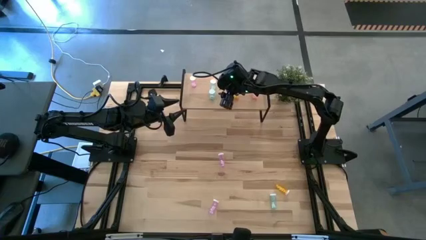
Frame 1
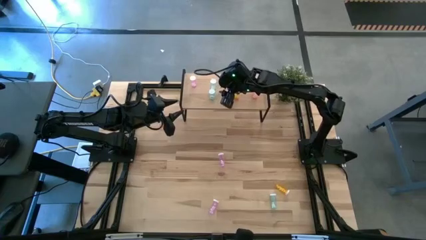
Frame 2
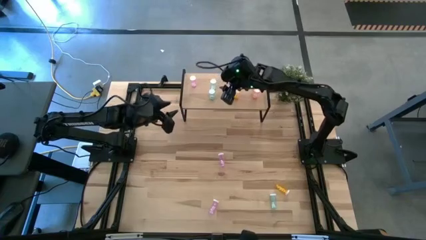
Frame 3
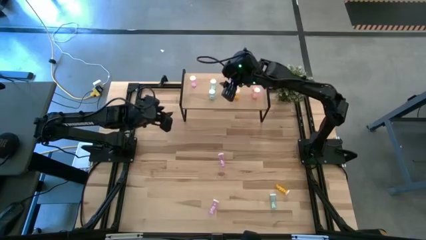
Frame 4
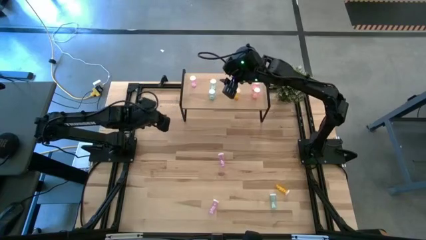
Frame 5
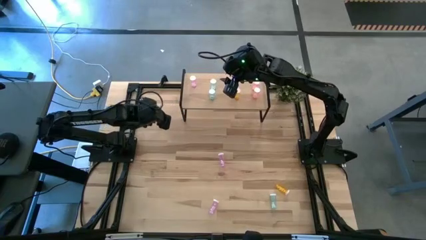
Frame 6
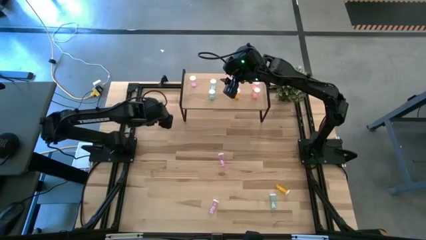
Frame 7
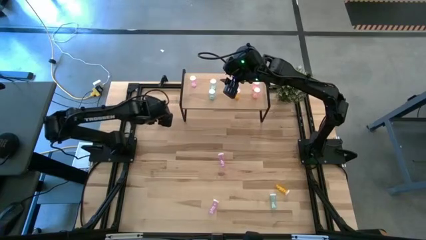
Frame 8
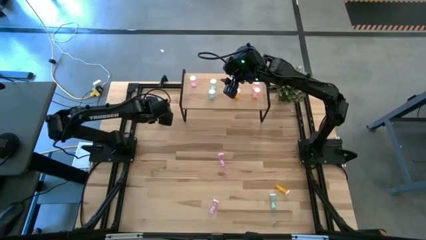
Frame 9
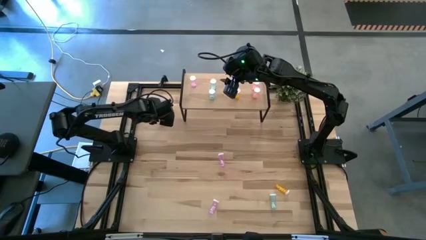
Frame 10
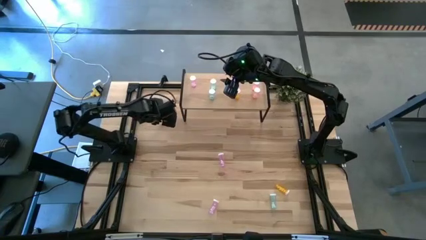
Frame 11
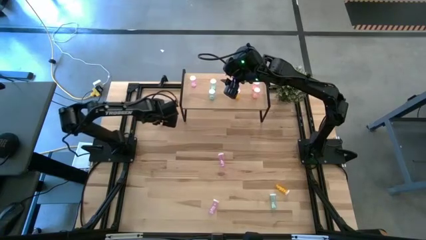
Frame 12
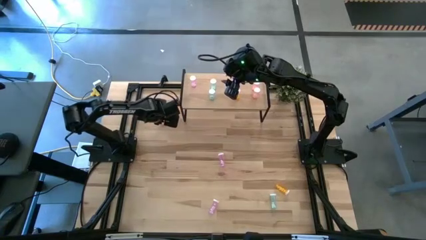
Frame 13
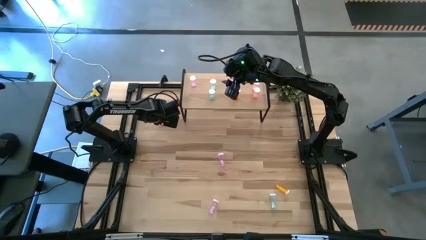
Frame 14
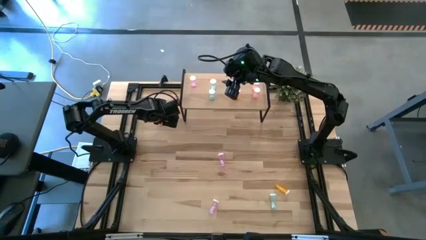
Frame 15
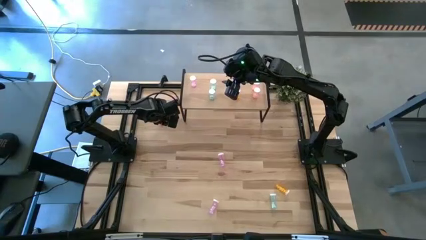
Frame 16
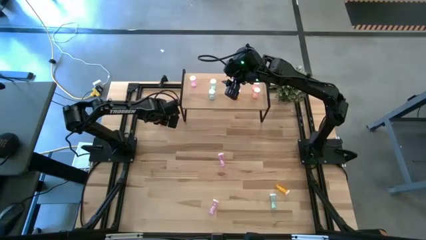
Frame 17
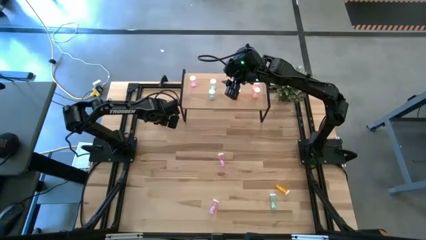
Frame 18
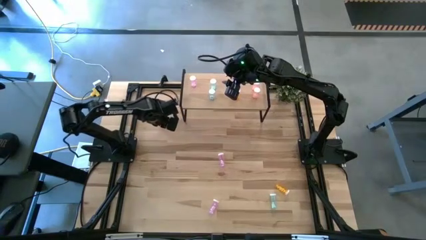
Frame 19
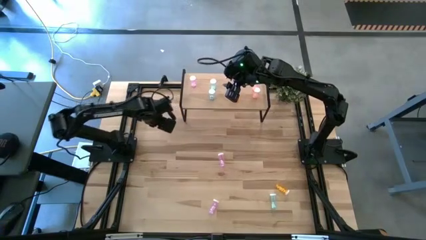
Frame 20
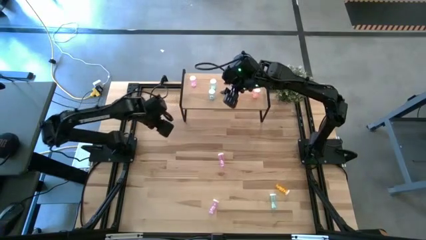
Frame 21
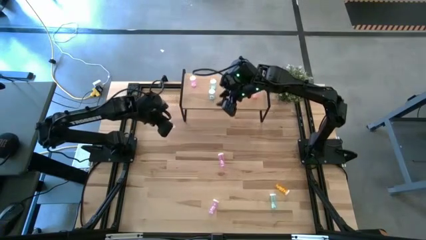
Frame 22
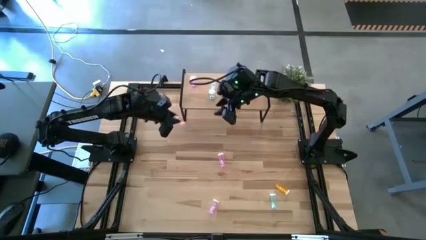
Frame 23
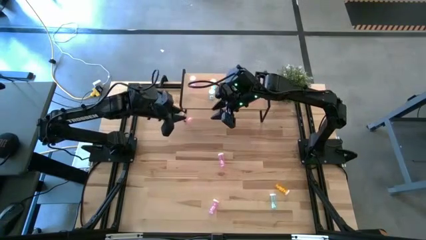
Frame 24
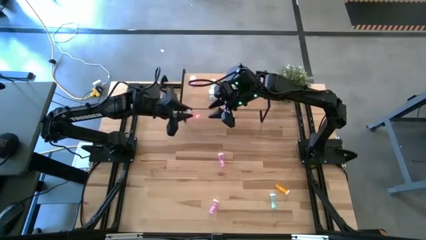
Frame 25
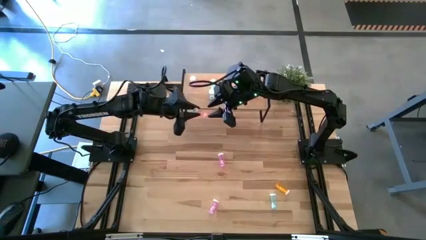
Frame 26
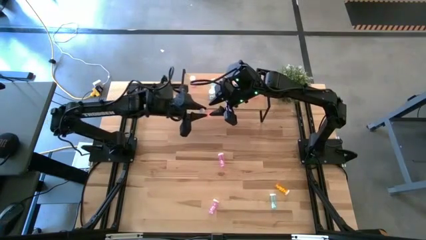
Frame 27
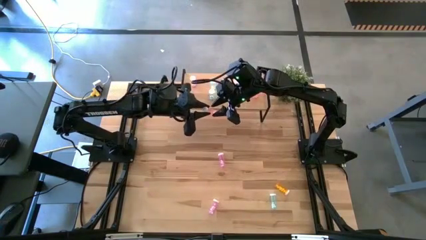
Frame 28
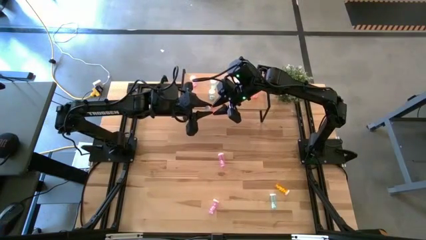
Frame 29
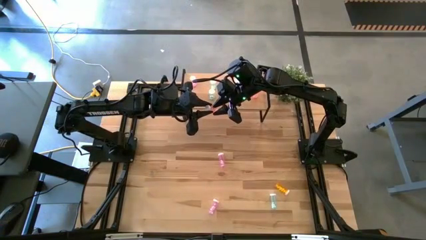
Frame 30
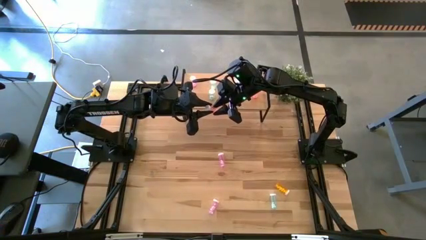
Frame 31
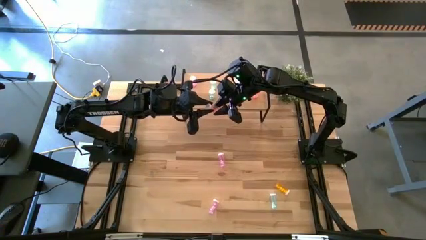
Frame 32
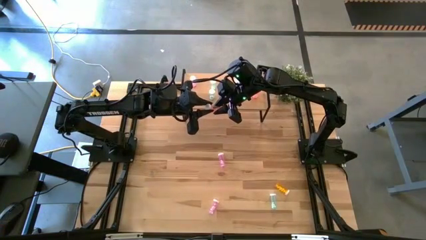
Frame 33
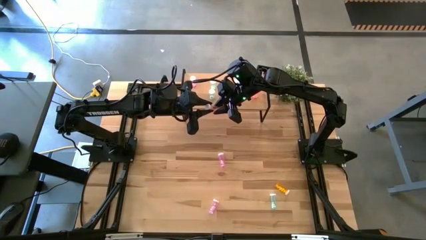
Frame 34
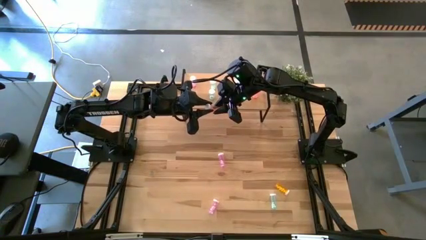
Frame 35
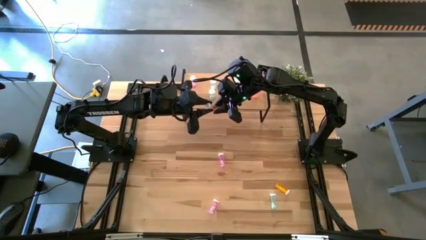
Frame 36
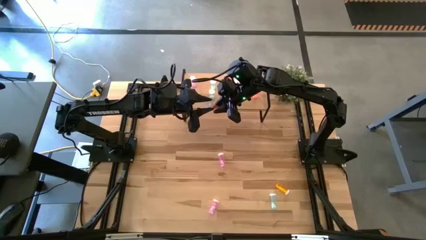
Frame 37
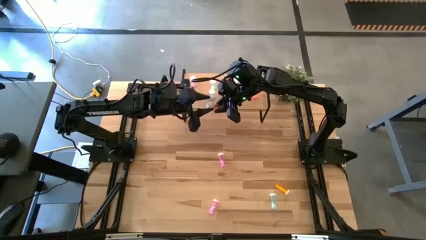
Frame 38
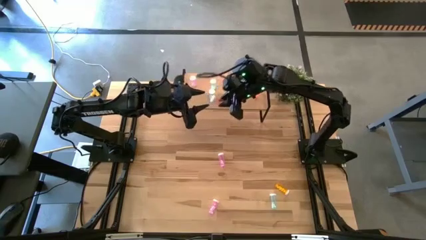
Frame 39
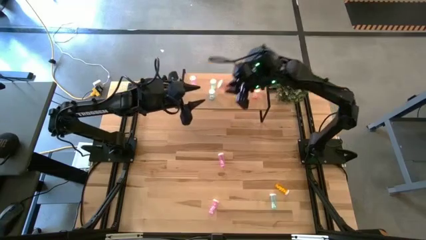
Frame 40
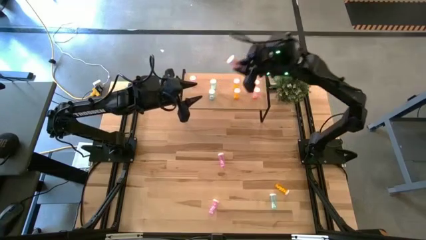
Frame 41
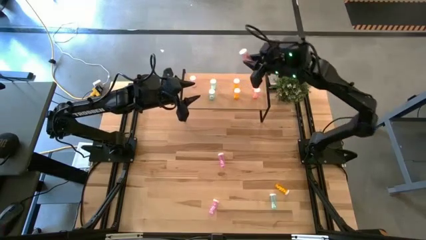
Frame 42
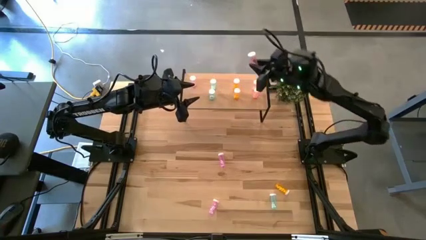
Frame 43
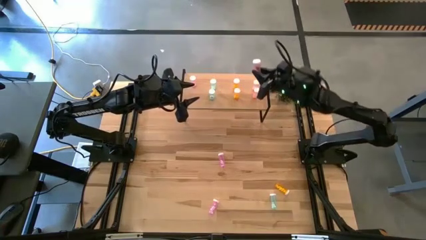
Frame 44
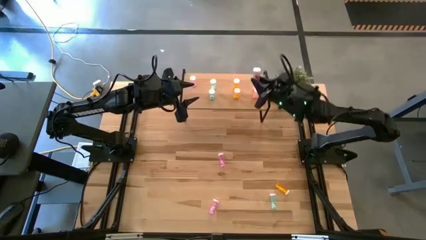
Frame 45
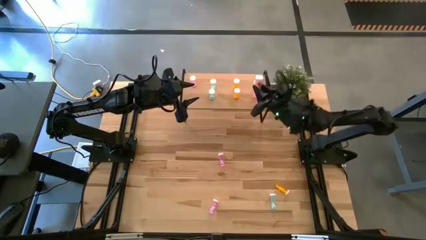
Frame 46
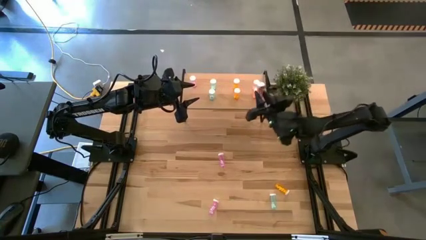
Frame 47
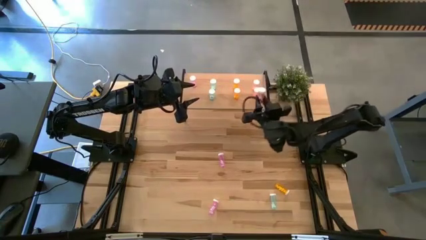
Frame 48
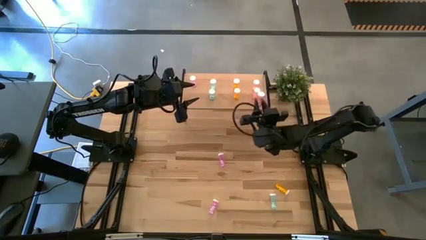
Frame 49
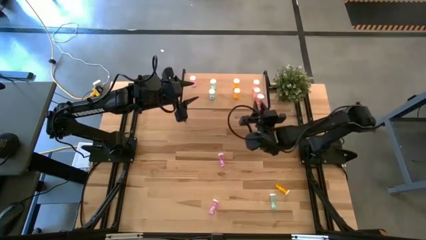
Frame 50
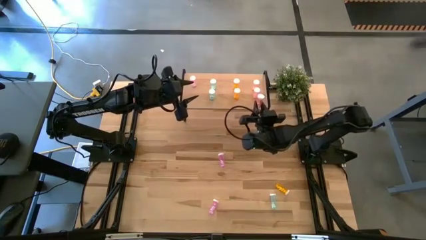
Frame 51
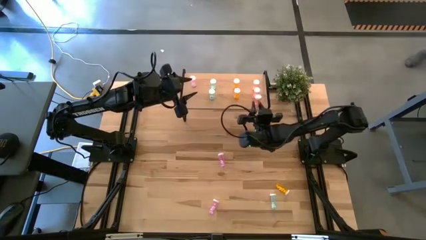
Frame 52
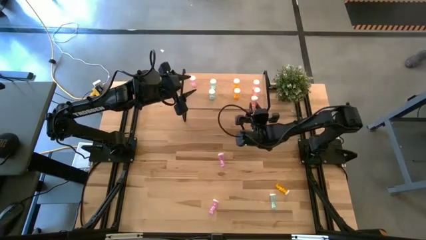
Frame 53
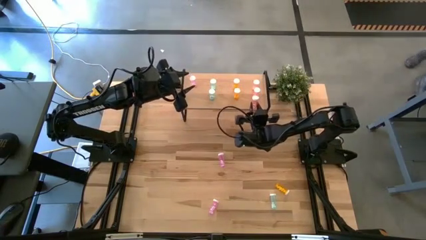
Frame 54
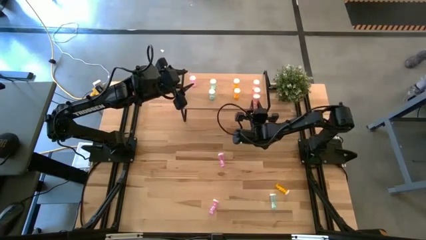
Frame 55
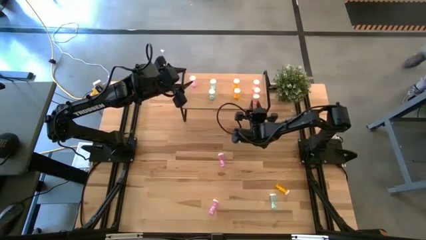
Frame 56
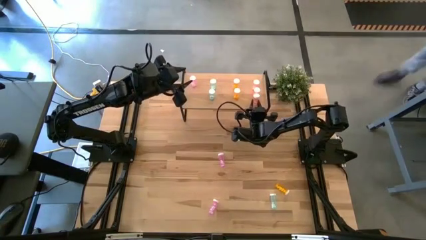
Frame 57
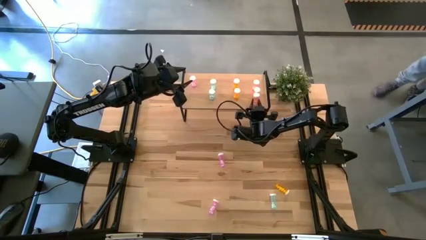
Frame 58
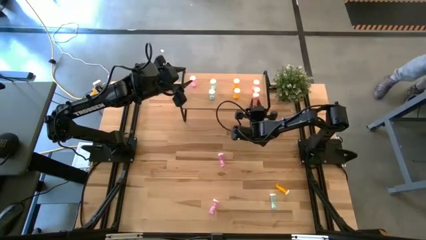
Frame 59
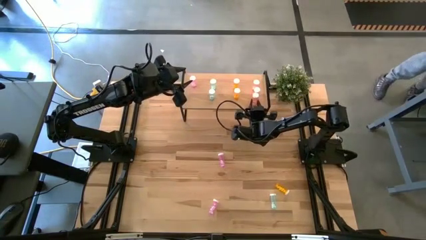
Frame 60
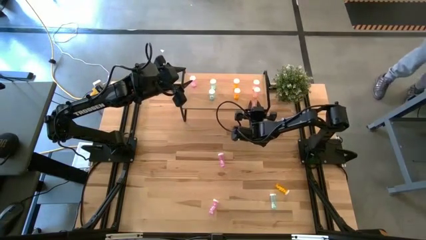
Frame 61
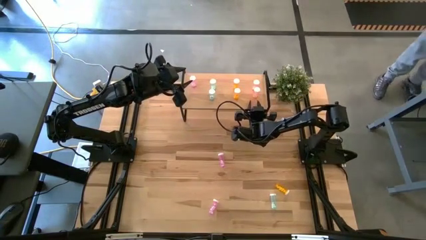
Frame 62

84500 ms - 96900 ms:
Task: Pick and place medicine bottles onto shelf by color
Put the pink pill bottle on the shelf aligned with the other pink pill bottles
